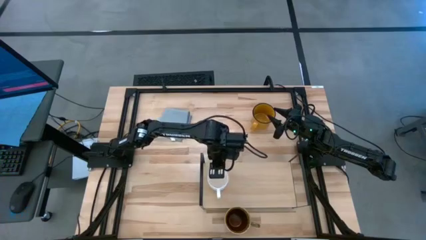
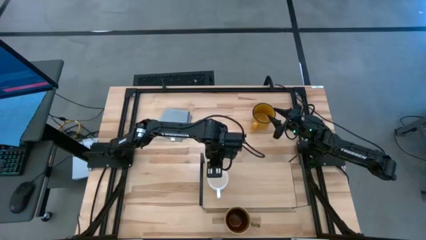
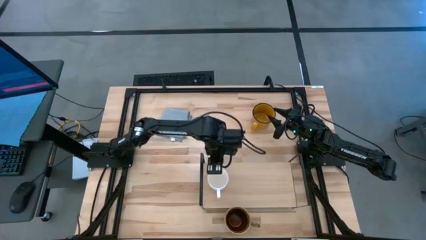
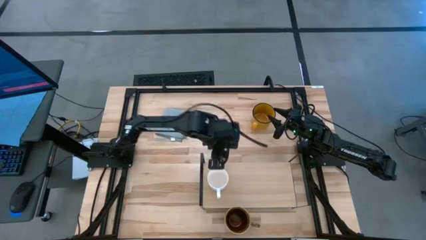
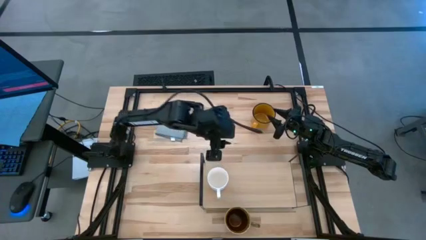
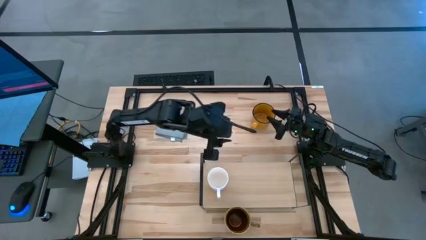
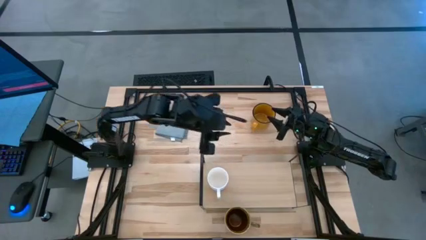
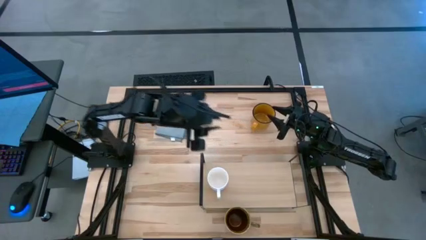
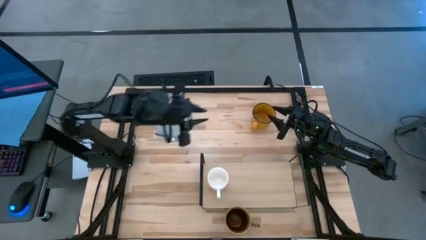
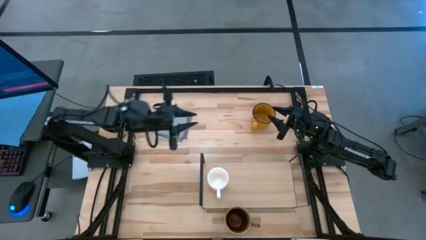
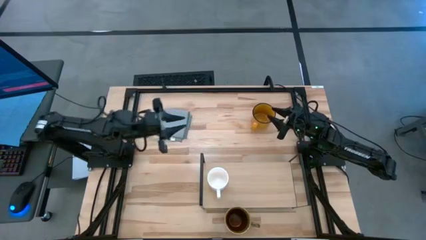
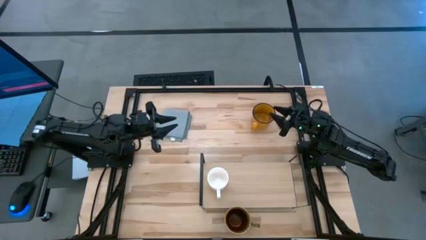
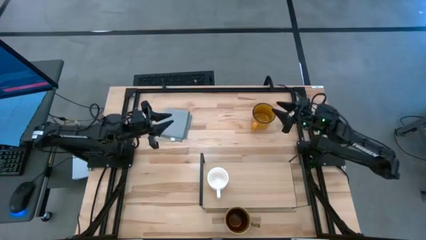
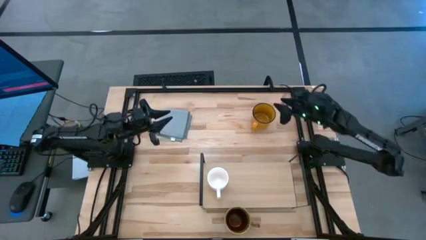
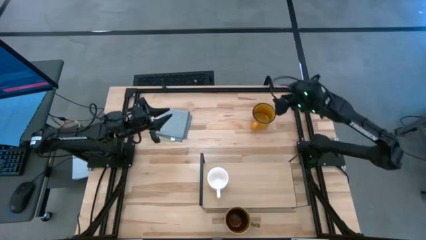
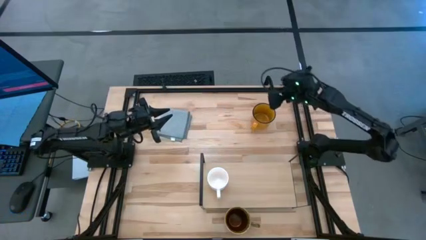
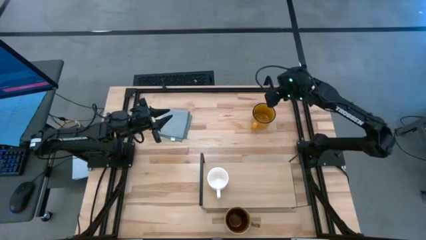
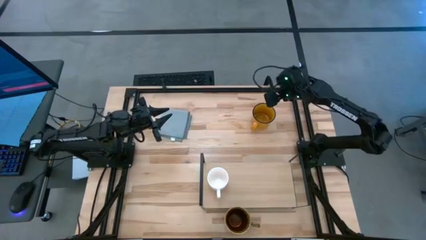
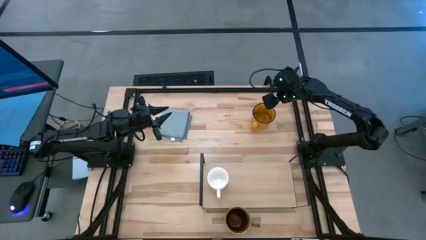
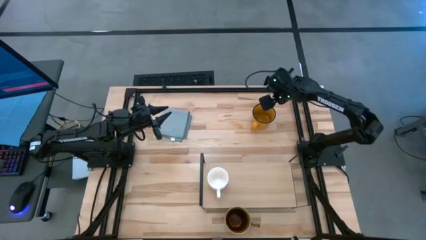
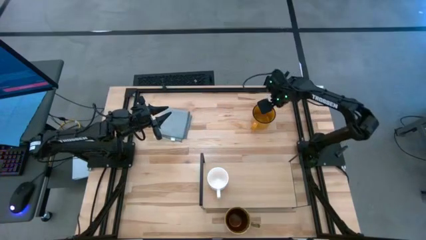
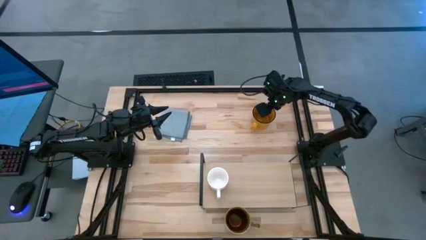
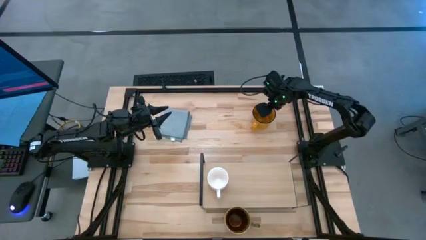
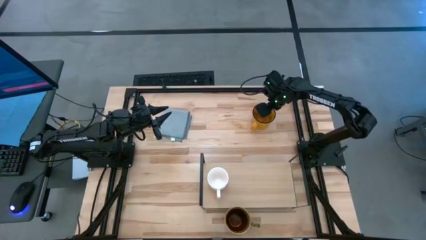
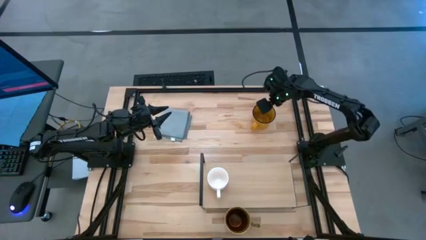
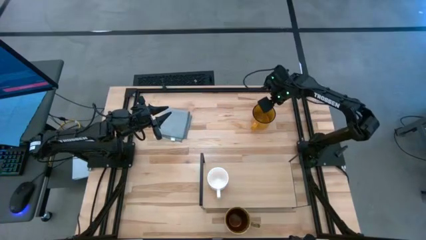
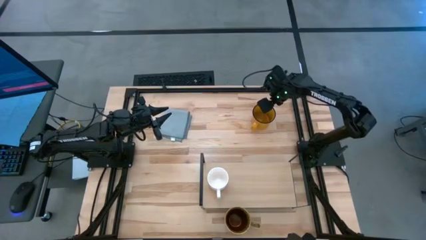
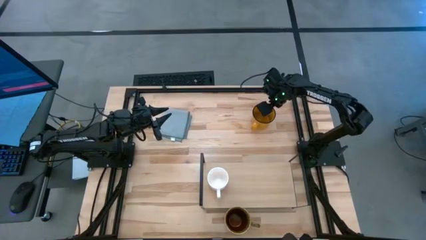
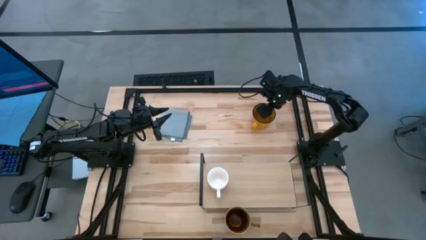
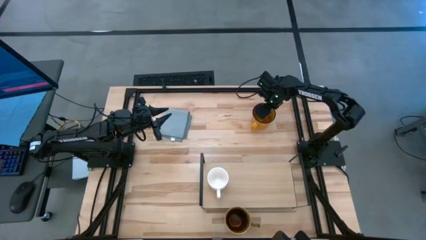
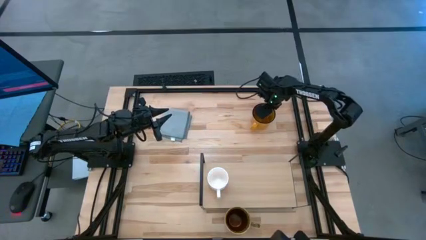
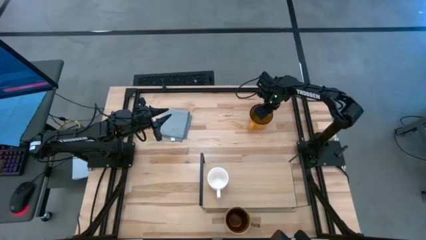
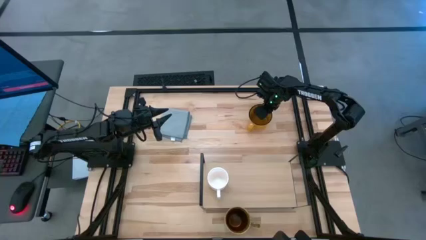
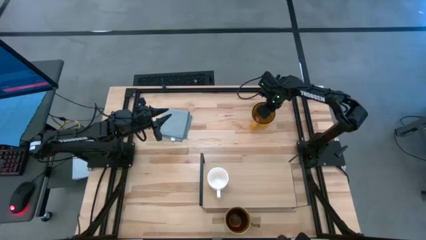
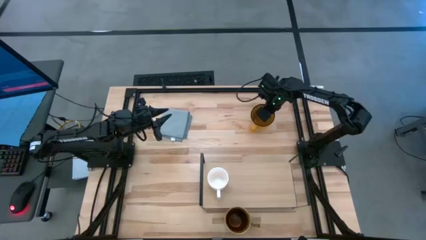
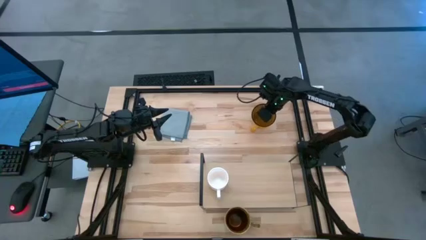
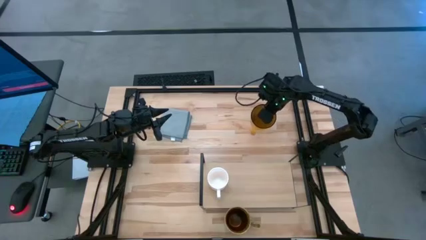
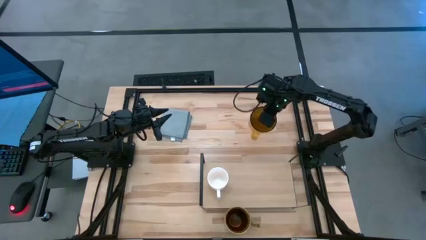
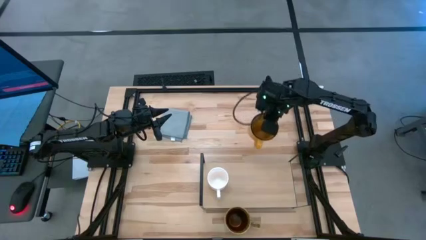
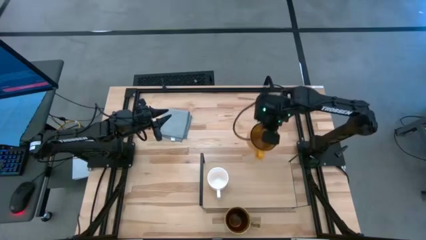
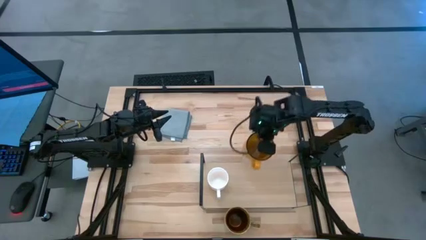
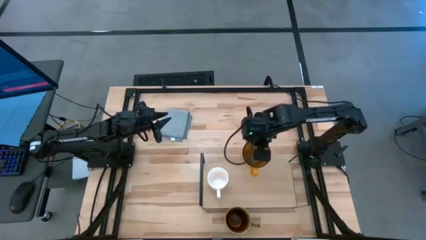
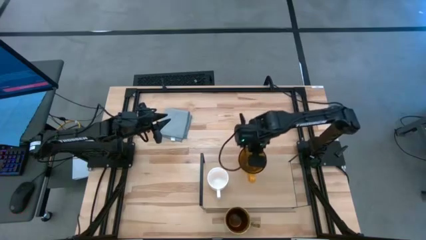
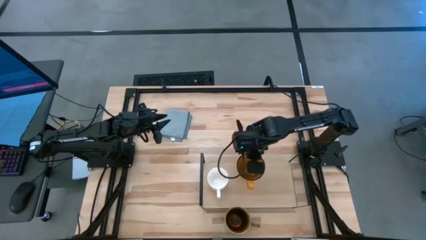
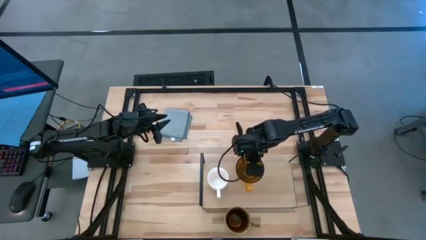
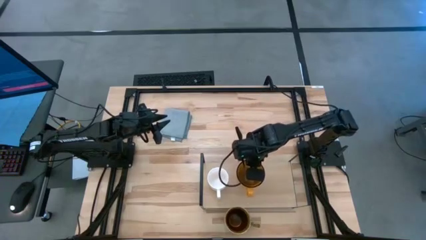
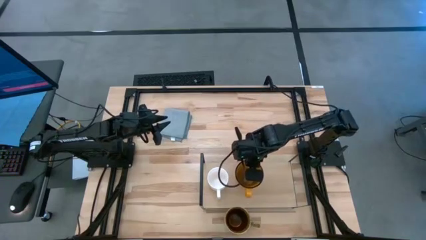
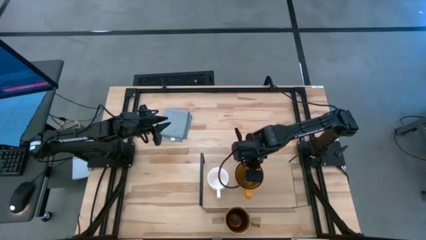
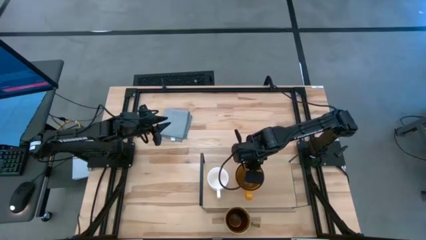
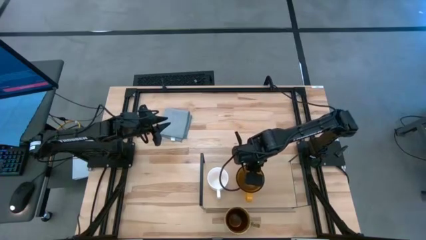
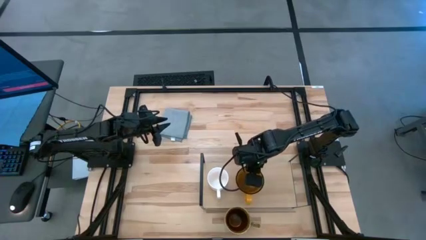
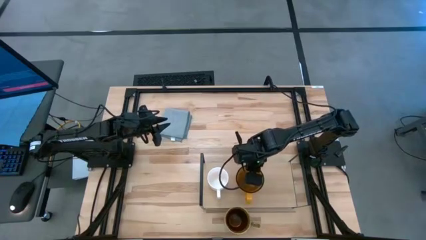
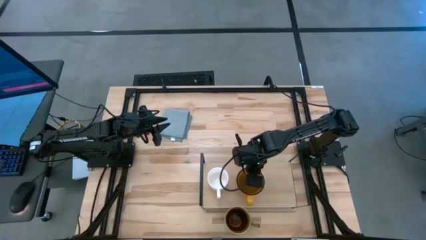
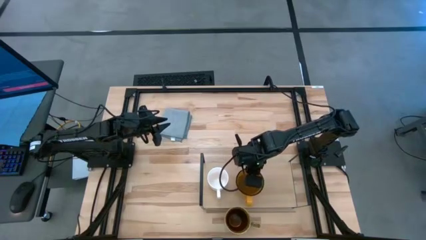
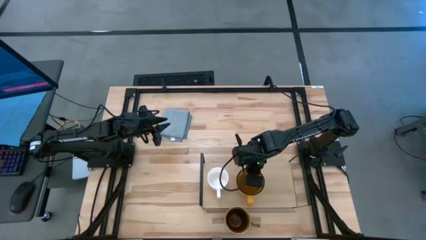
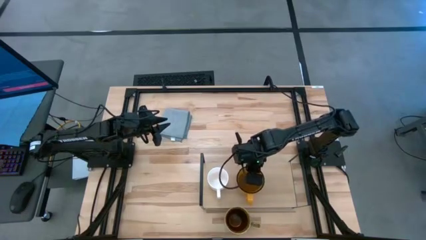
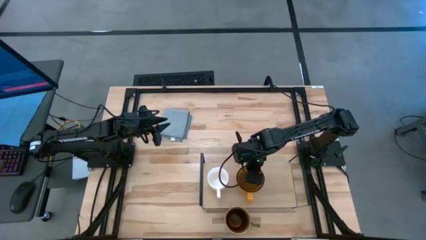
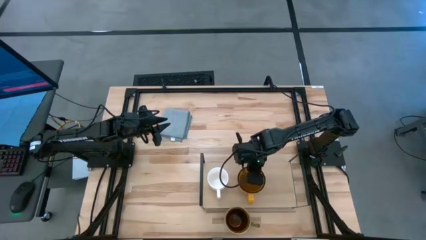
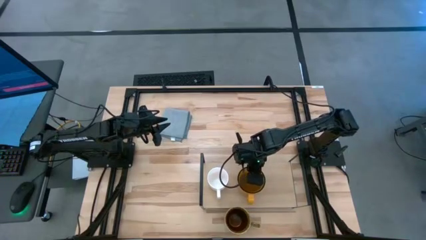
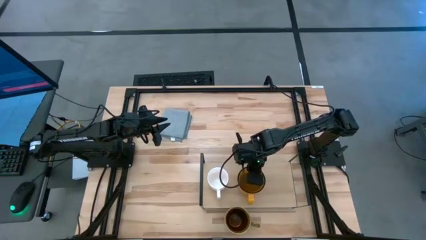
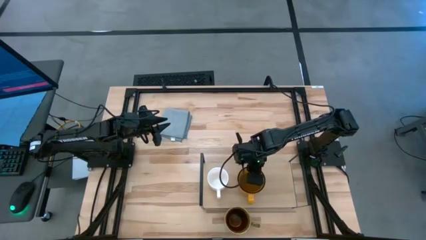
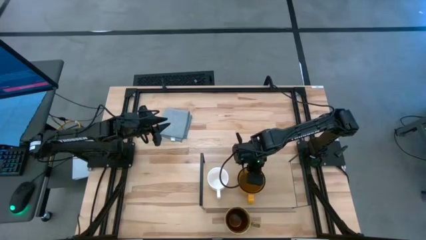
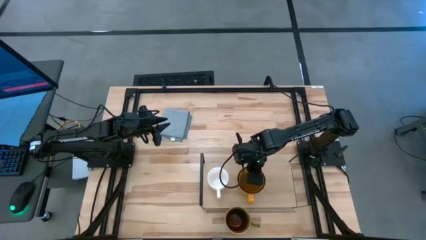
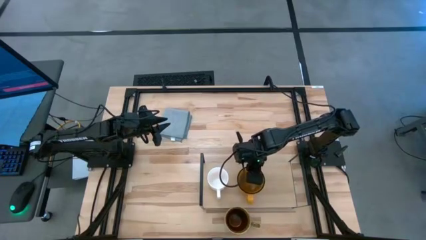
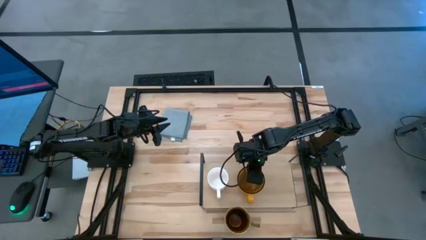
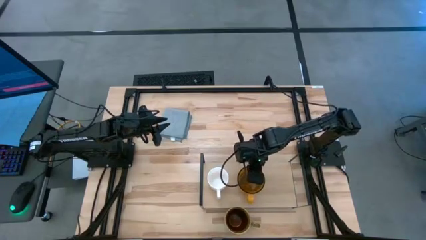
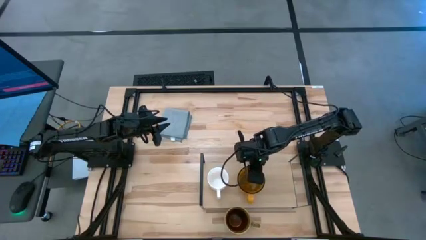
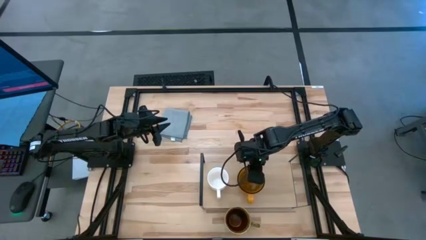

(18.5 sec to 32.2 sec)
Task: Stack small to large cups/mugs on shelf
Put the yellow mug on the shelf
